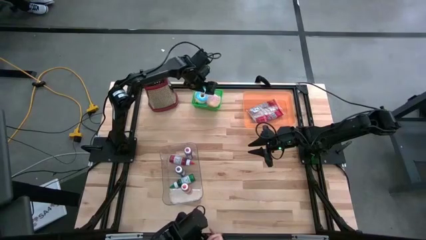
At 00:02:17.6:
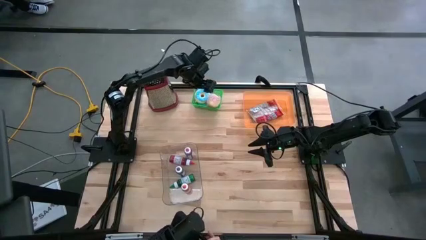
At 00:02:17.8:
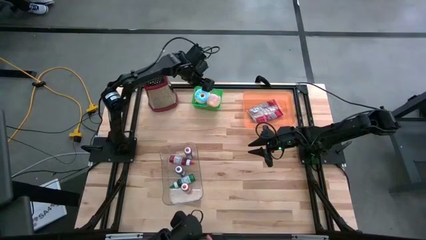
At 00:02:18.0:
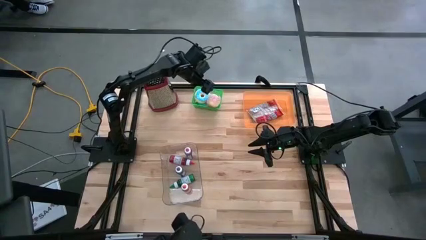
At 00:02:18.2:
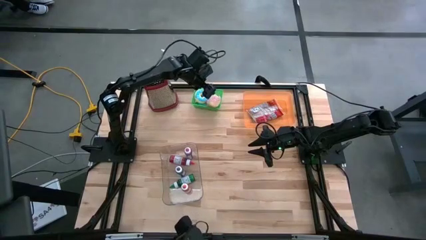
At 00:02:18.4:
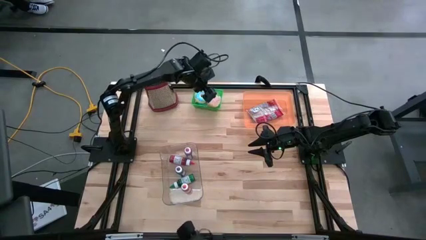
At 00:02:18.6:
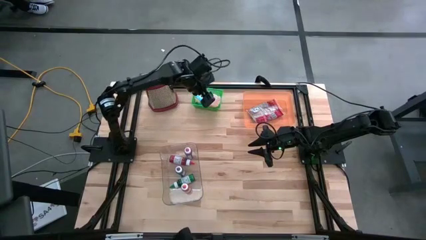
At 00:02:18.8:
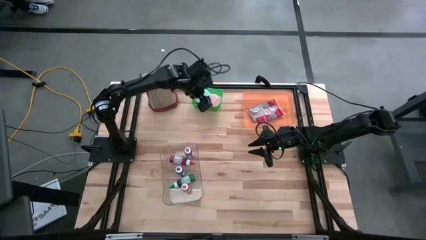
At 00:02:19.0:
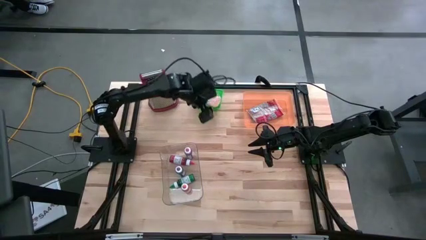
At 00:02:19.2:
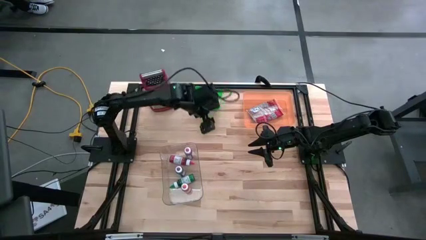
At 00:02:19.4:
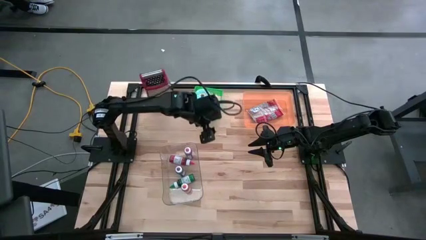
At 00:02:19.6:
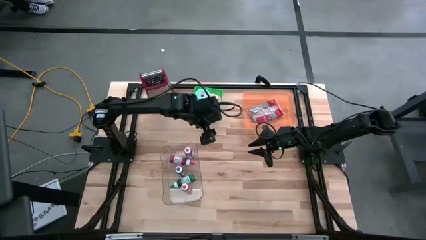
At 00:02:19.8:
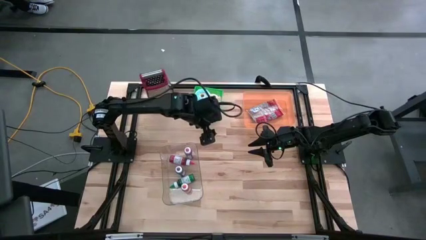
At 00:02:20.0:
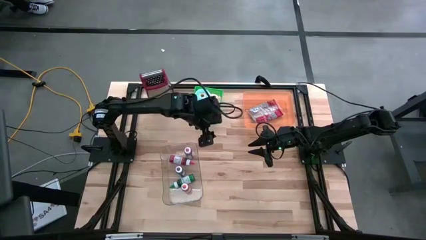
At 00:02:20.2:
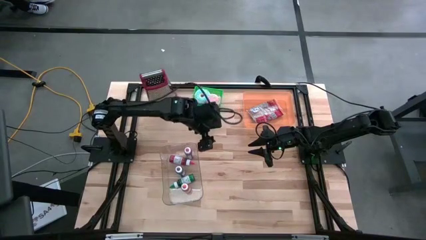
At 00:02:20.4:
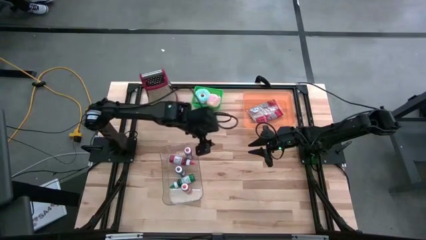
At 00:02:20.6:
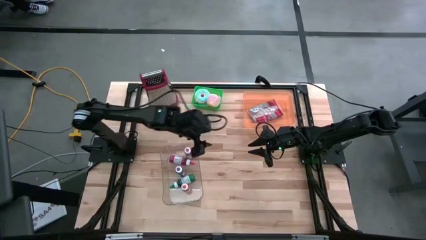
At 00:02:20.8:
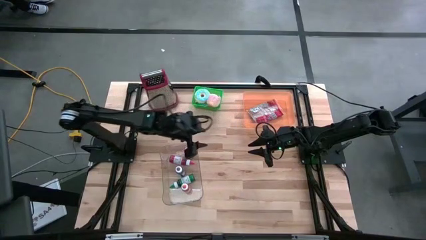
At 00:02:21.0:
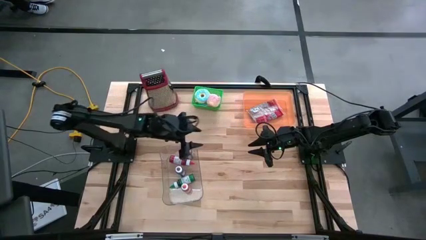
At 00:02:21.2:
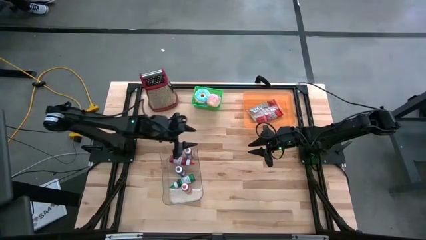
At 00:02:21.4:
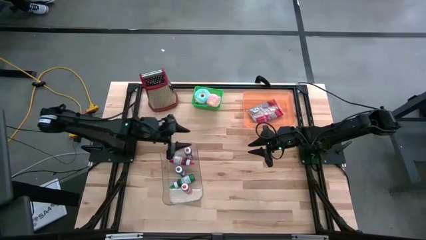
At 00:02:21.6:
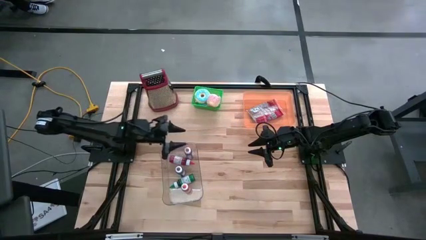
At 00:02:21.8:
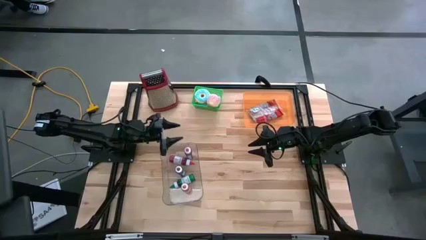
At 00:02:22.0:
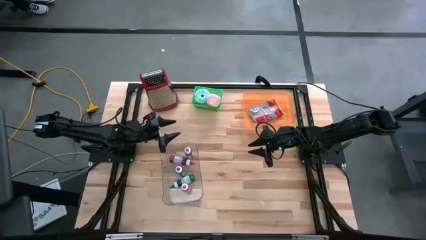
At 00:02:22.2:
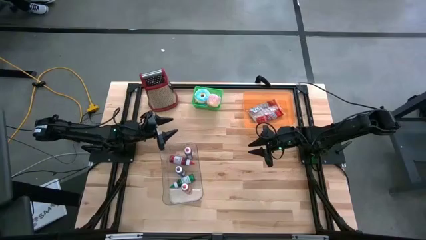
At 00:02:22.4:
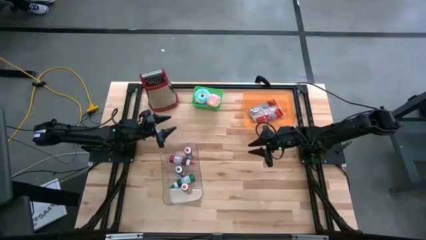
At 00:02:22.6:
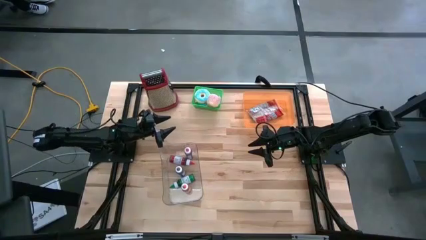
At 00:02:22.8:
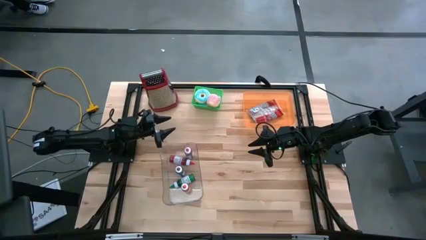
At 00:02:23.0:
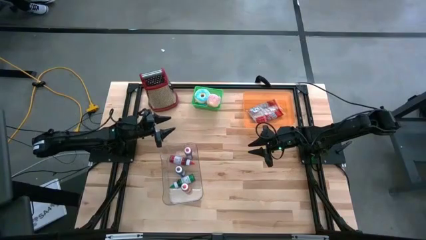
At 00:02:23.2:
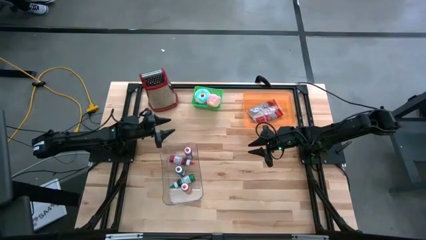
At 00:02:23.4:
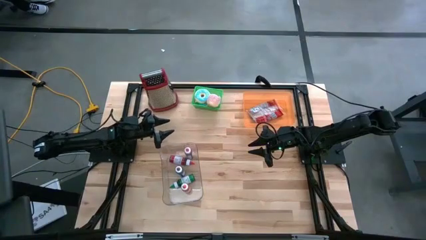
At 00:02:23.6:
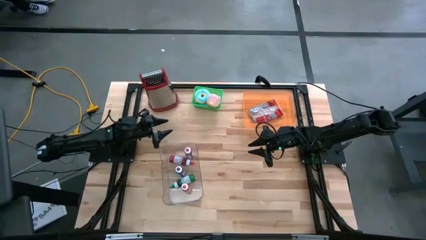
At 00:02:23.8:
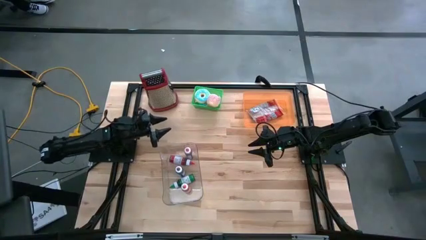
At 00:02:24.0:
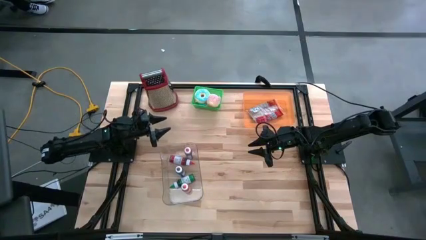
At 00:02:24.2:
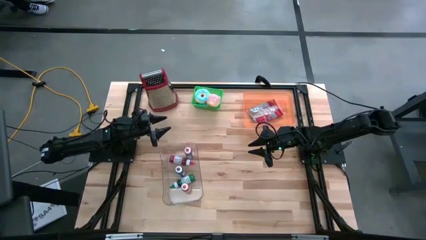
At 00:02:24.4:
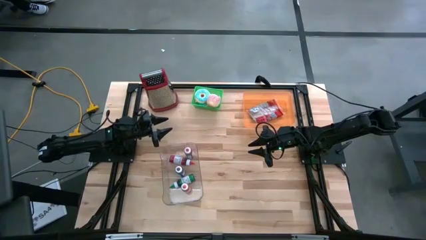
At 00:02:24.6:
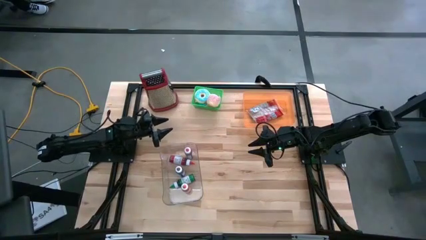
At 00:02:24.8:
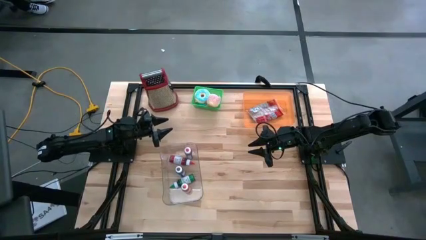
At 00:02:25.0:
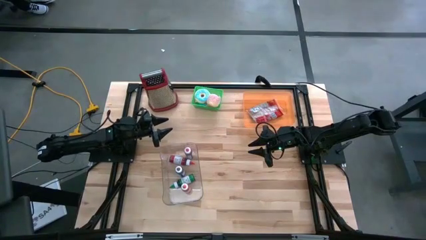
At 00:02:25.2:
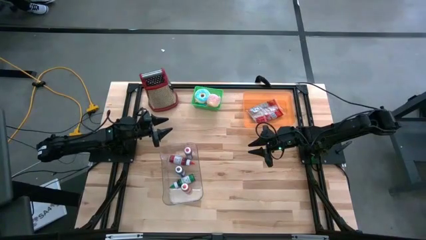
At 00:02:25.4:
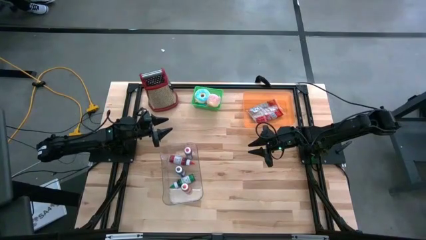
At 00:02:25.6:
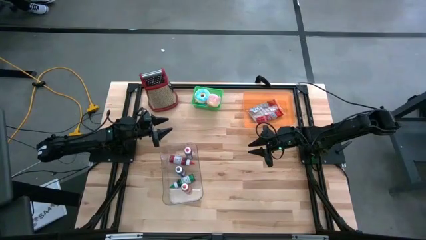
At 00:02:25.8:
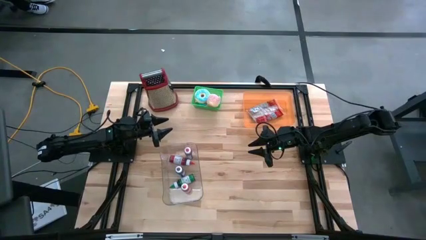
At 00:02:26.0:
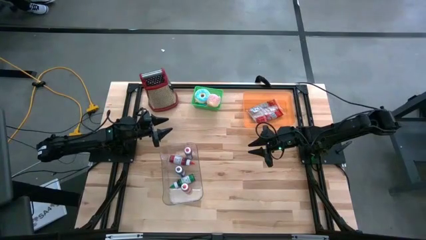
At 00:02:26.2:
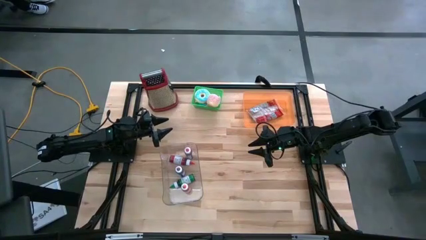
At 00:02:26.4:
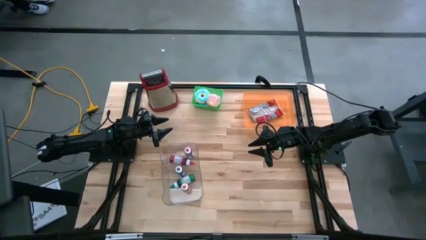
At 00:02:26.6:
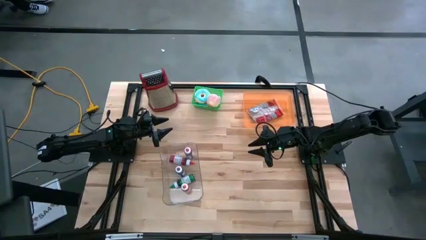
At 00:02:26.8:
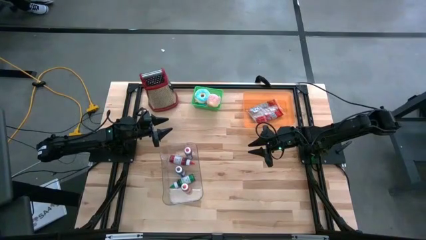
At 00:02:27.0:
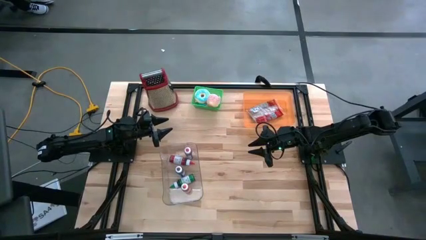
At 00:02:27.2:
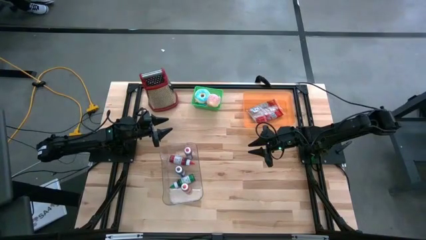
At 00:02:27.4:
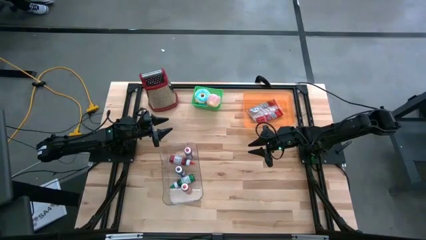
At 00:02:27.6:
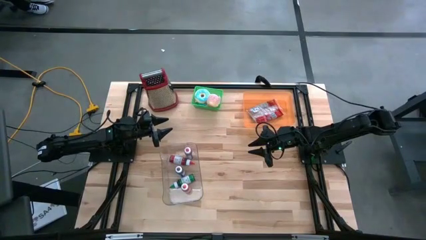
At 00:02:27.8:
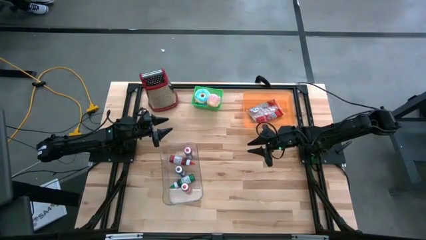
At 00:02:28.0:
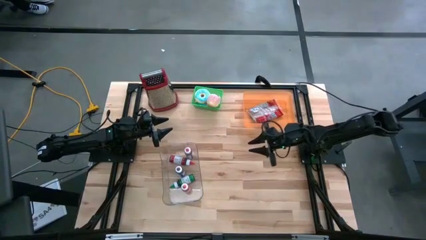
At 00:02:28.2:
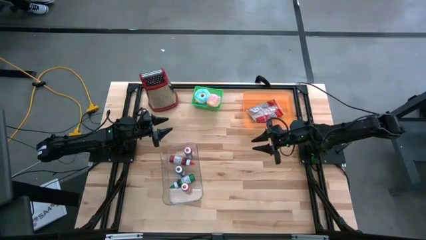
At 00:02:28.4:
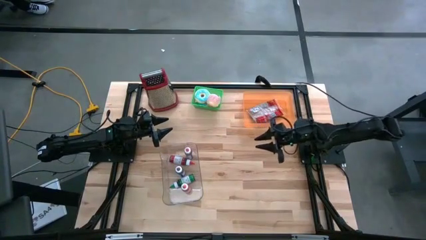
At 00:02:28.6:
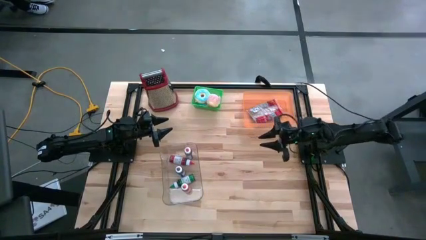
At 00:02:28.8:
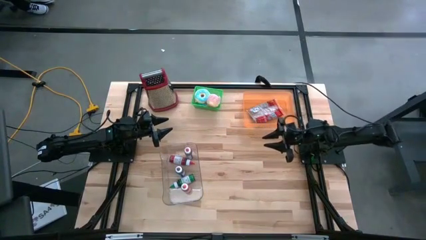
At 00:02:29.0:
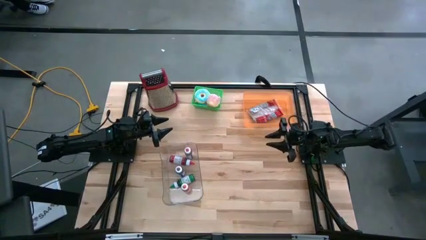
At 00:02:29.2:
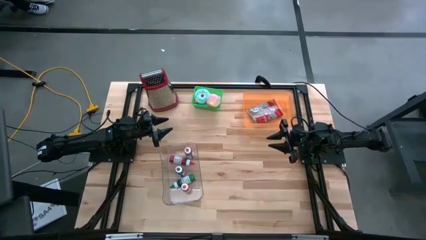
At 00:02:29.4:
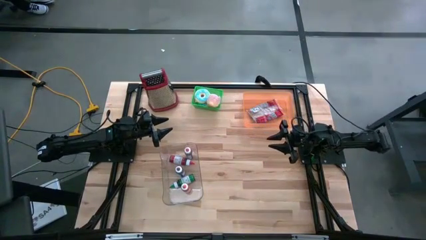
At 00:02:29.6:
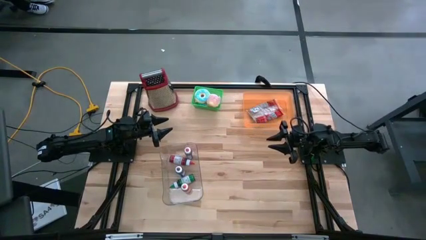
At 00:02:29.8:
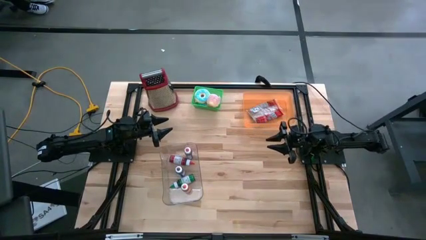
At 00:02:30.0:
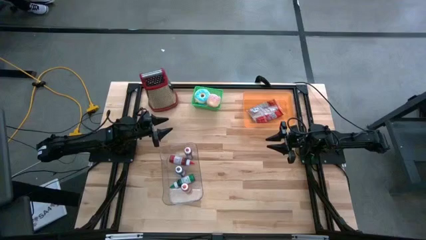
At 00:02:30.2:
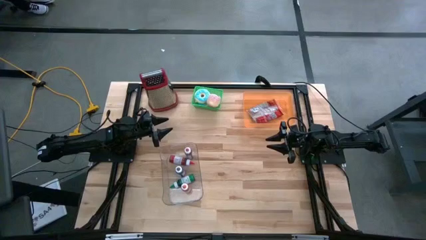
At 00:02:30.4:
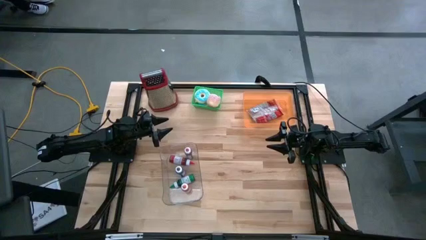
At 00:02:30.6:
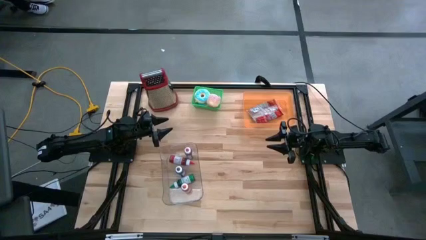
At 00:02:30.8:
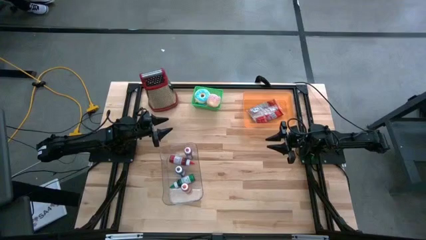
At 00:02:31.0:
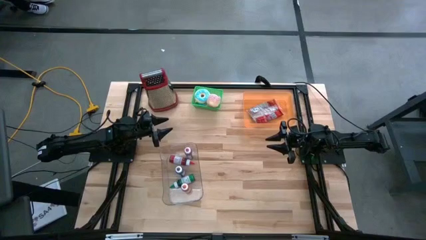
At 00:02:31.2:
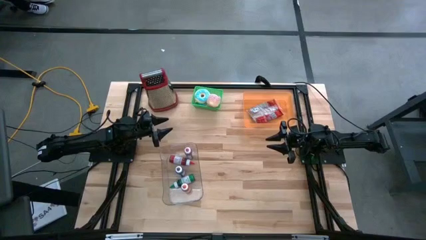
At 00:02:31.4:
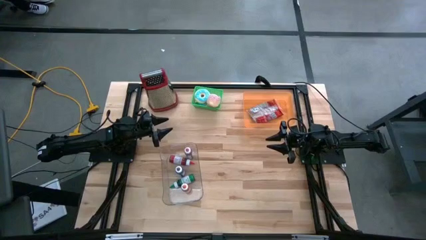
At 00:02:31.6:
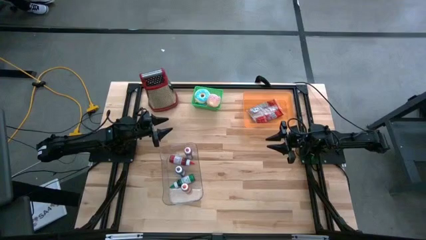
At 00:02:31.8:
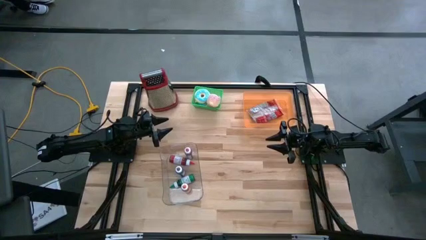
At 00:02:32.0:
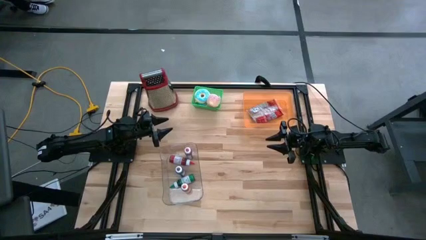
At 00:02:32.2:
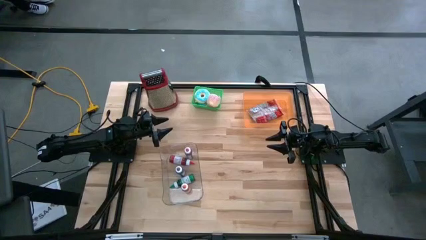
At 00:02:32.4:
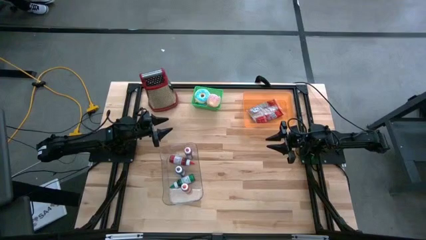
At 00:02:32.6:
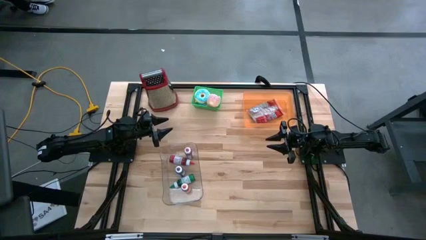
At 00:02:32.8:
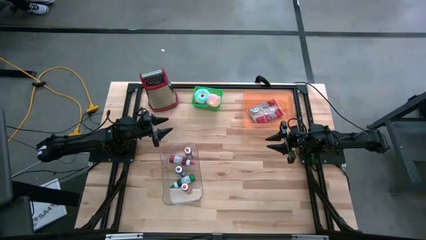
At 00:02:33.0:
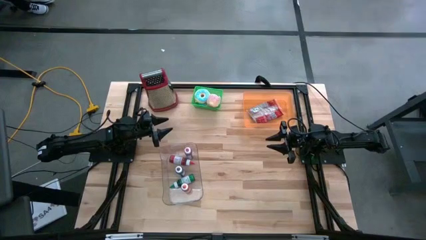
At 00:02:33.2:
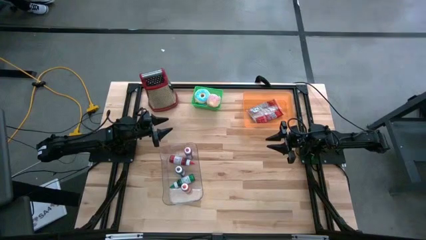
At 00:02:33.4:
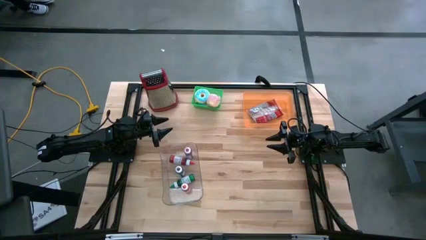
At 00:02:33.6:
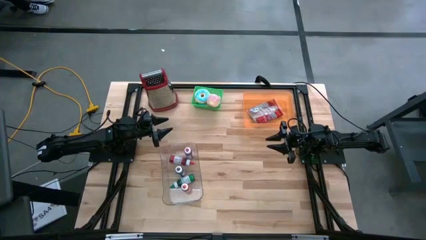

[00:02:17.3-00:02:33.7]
Return to Home Position
